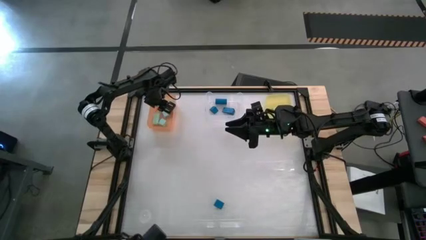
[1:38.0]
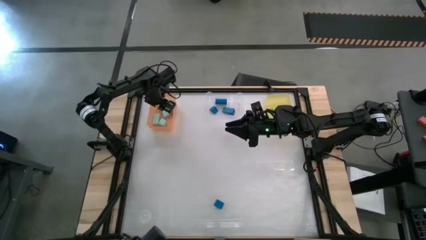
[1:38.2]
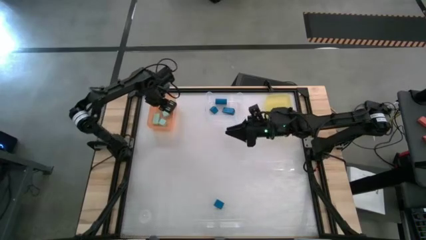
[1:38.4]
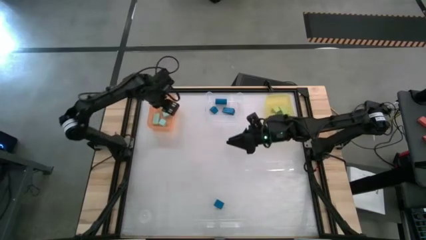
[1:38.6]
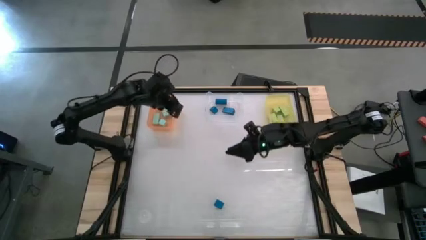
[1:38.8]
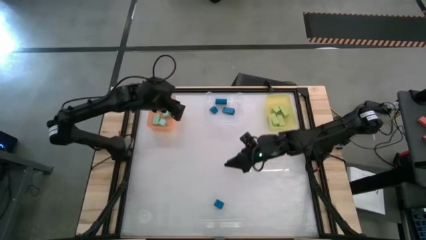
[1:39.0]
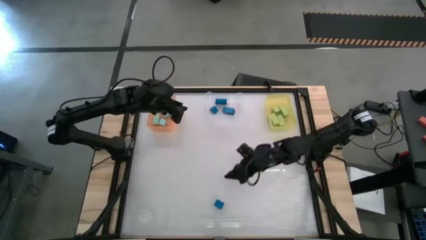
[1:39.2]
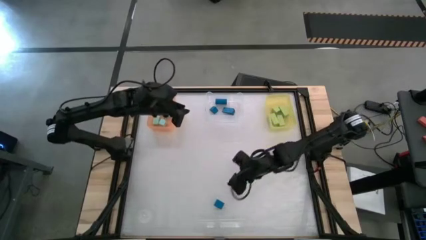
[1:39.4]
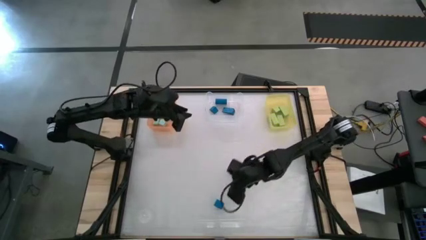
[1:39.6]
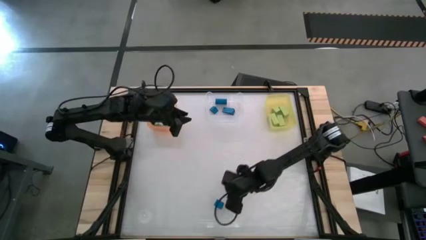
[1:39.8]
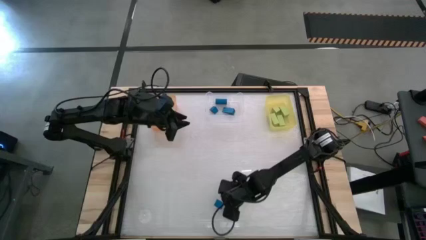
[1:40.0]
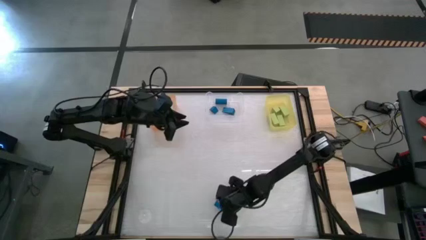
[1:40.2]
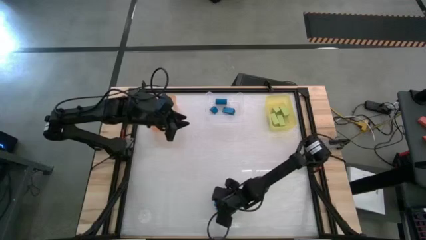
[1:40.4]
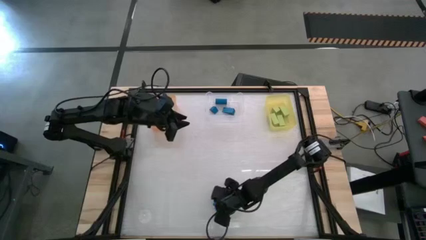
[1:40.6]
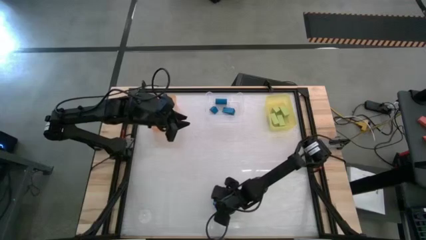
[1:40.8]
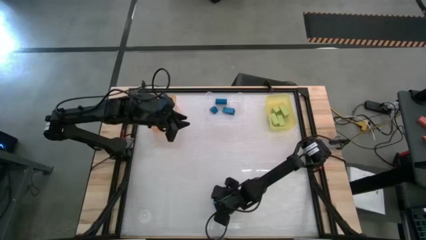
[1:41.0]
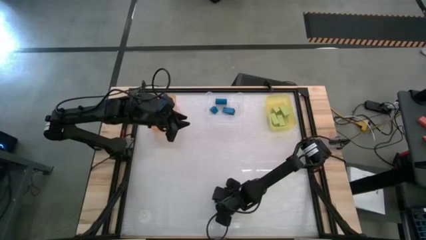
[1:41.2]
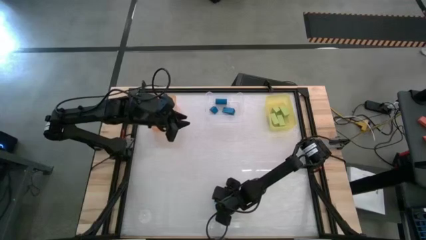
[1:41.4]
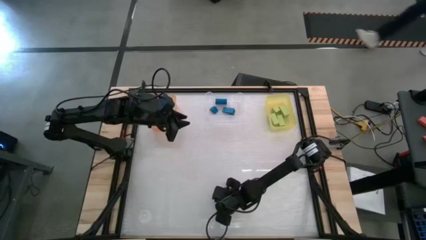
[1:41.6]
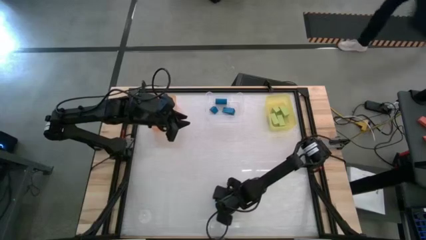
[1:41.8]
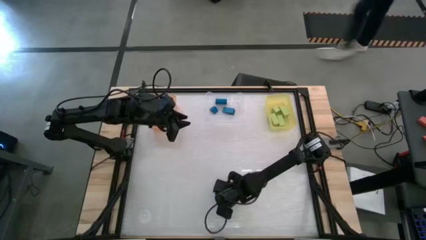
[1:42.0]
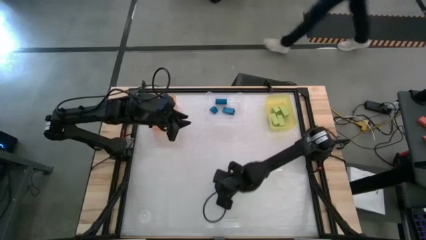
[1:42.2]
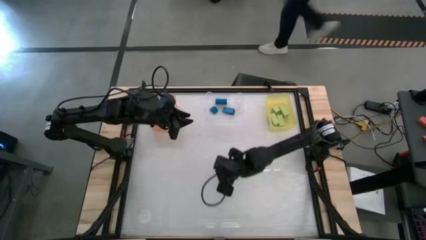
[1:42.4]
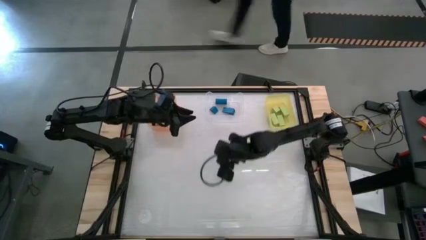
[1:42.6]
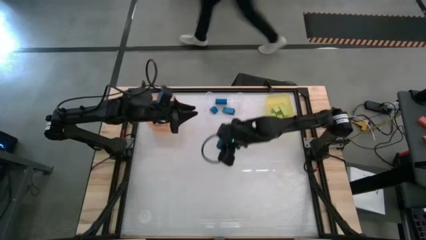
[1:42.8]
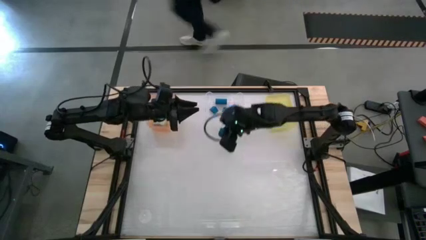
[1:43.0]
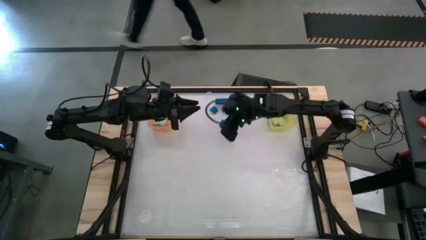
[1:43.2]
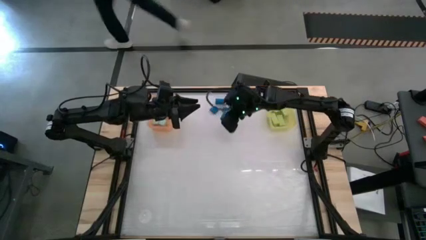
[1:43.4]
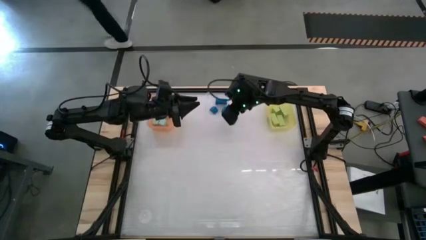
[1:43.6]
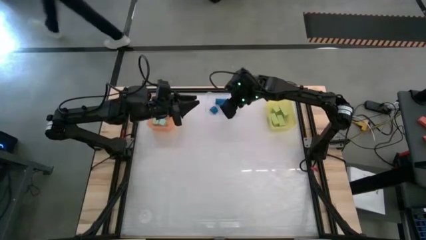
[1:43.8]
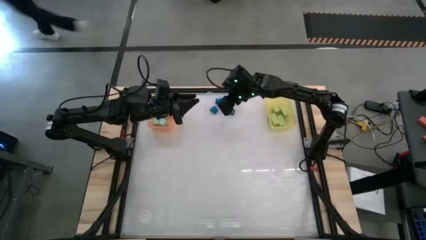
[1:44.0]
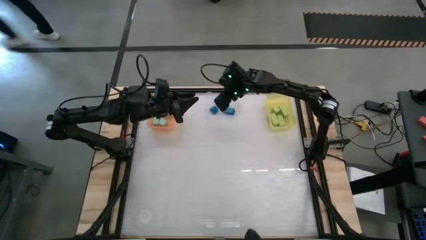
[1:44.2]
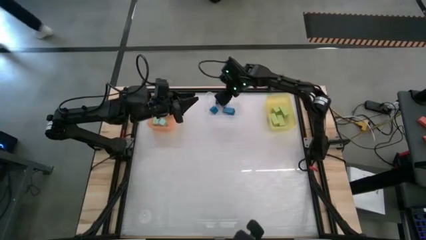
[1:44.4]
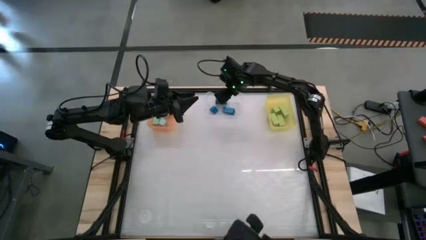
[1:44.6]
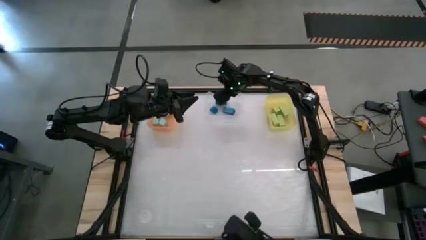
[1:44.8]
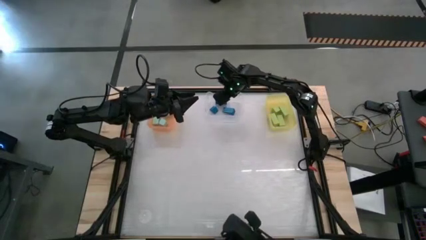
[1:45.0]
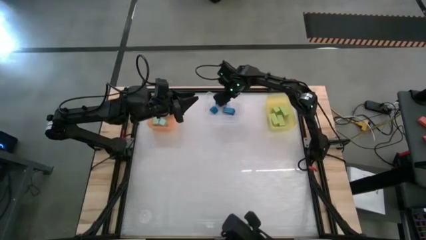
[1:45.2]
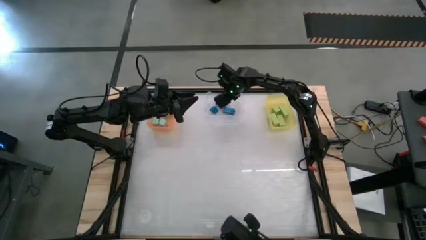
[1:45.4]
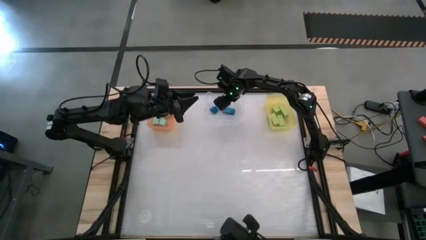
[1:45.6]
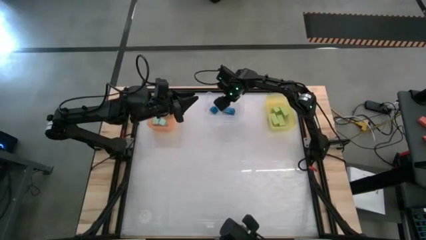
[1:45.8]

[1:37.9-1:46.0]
Task: Sort & place blocks by color
Put the blue half circle block into the transparent bin

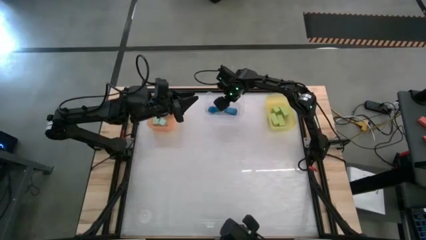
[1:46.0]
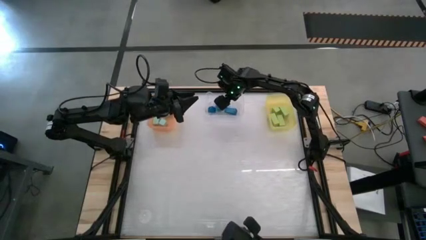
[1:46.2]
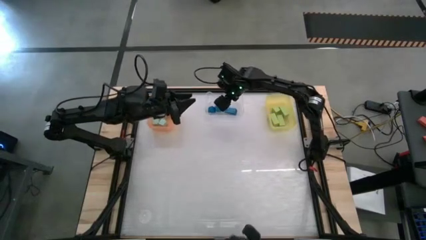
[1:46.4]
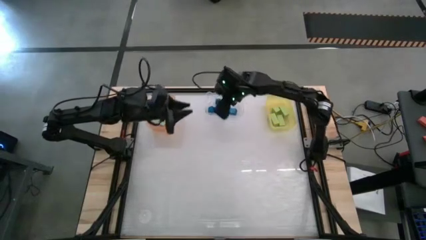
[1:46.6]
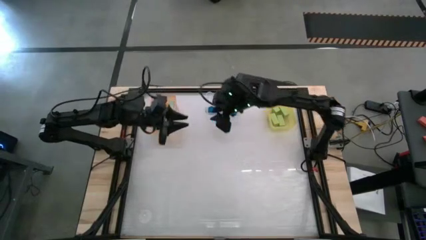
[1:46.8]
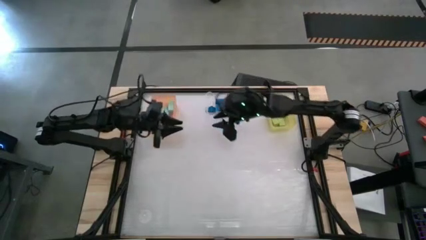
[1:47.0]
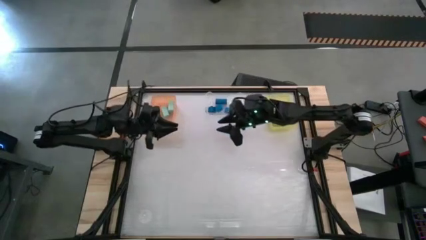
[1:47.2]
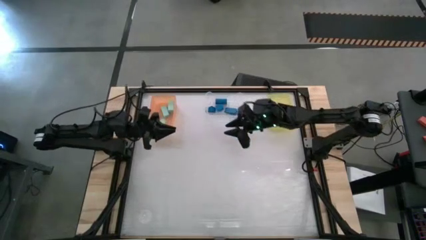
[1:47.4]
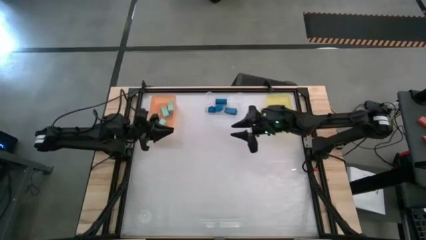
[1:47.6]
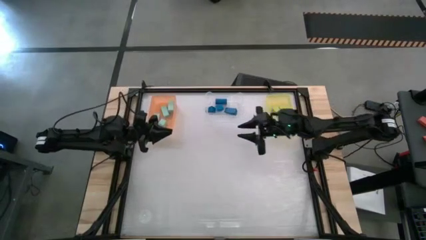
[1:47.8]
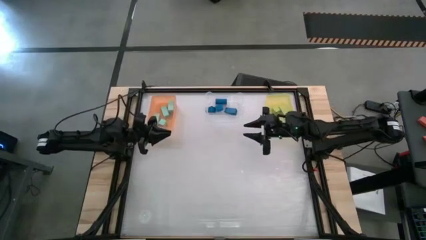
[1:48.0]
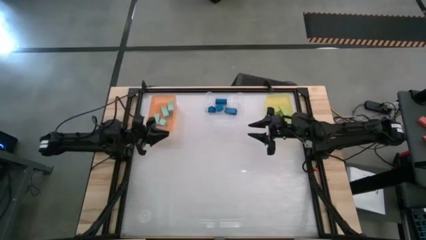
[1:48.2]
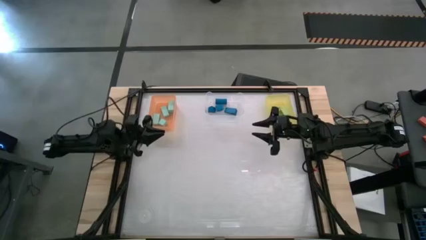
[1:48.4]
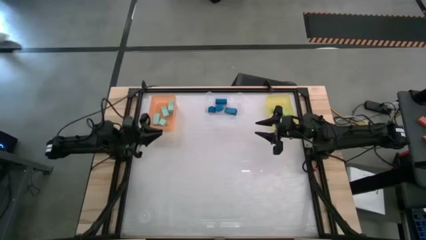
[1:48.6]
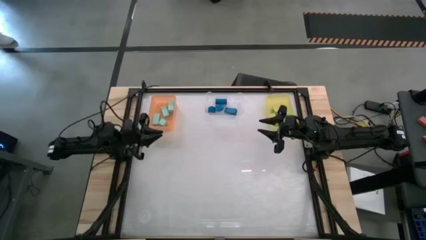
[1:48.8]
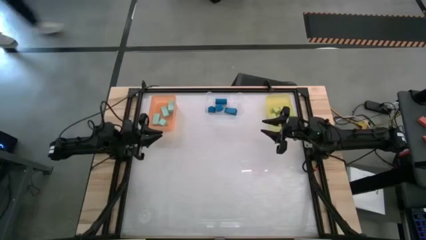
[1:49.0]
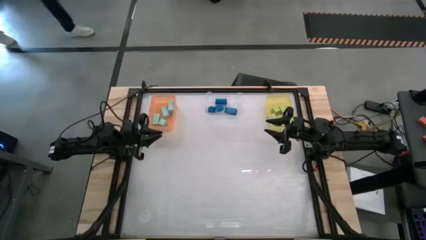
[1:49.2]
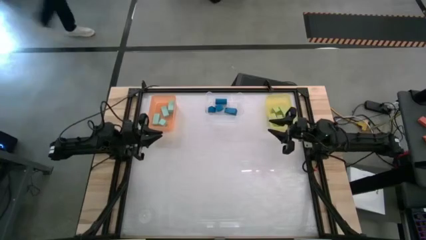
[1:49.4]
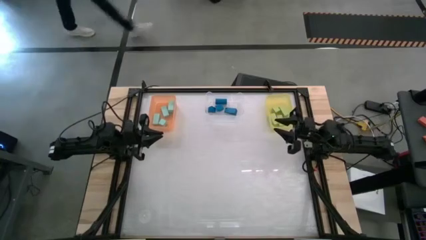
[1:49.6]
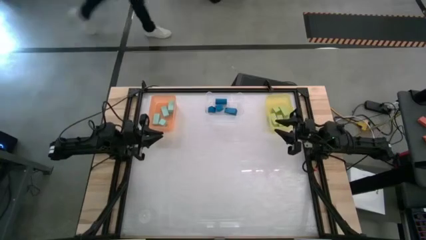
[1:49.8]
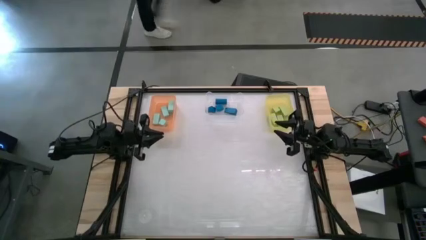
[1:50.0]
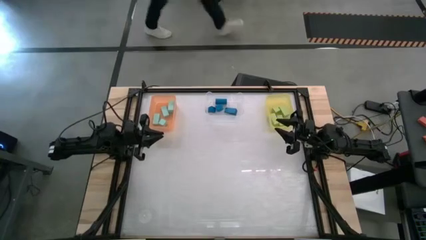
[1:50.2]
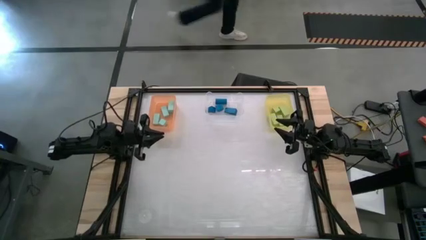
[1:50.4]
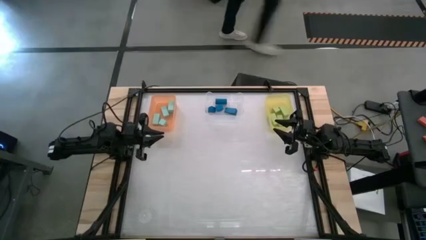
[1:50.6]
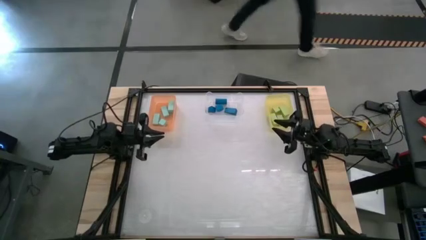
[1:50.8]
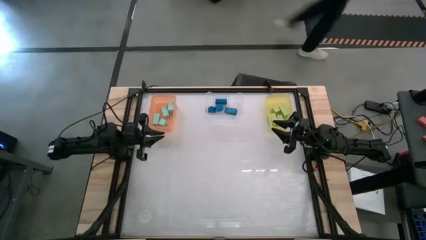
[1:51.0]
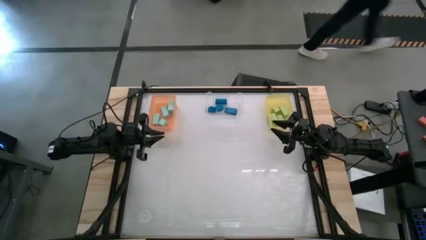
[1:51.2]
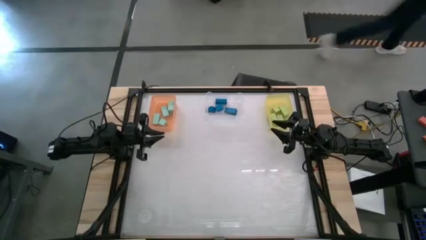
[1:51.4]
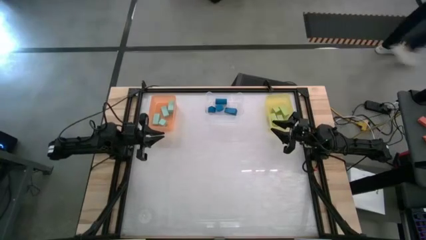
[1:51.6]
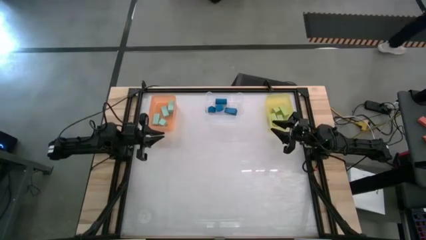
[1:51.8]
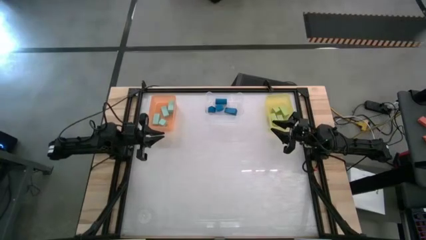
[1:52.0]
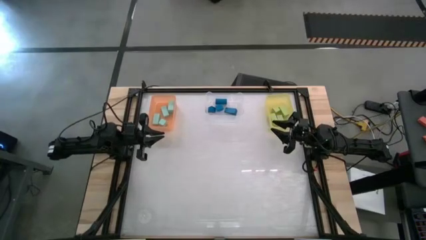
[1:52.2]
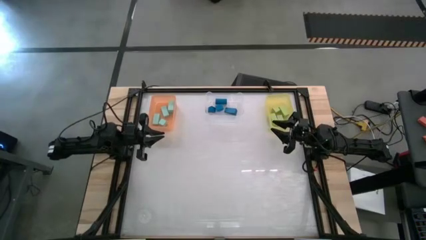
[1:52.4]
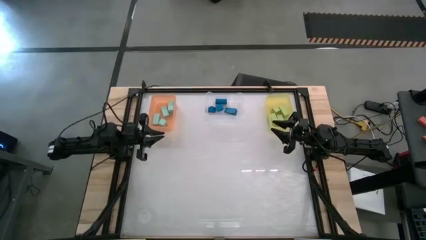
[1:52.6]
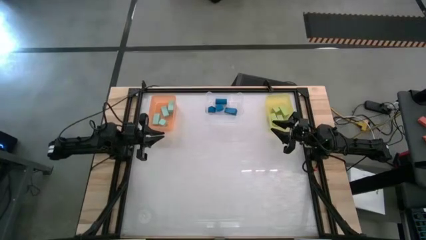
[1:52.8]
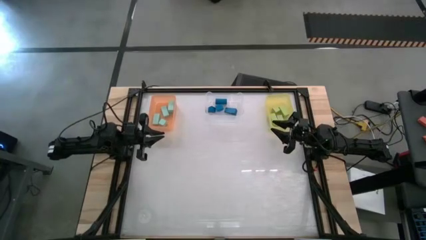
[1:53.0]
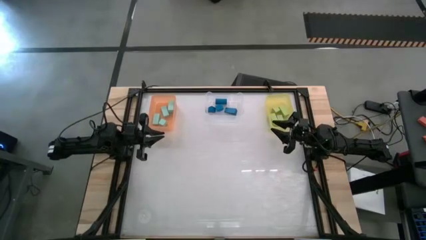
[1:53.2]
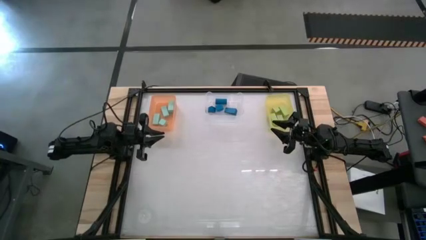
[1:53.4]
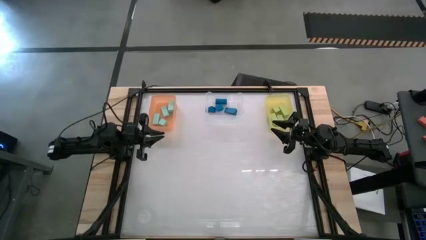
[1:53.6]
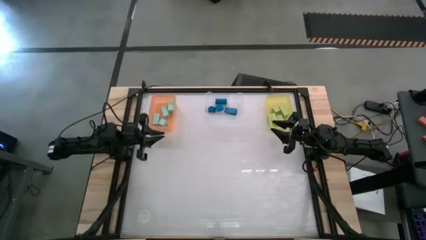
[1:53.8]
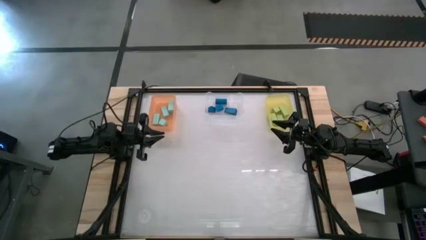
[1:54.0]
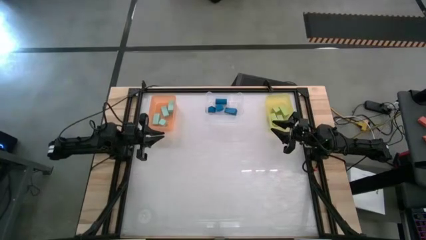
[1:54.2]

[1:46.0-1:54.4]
Return to Home Position
